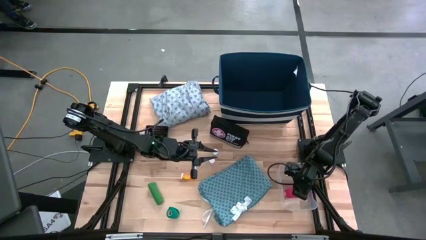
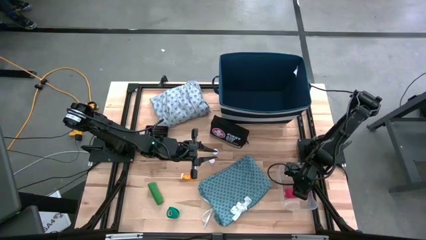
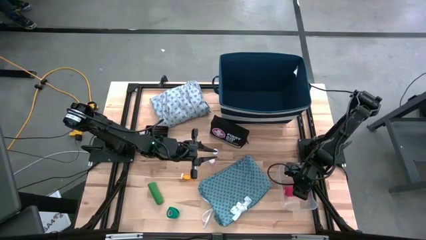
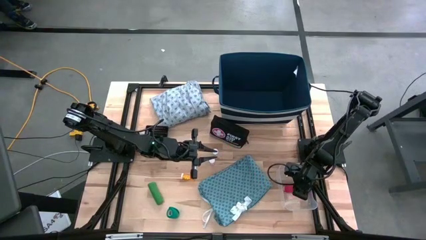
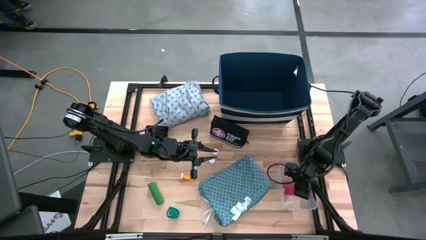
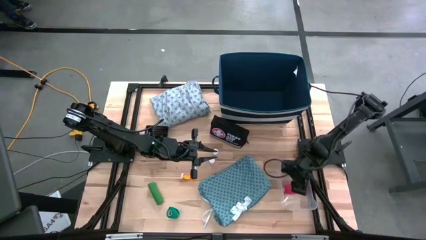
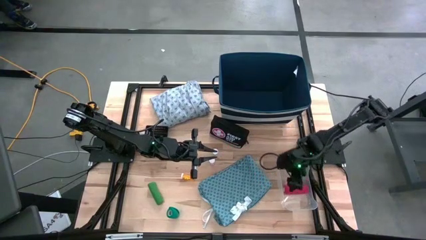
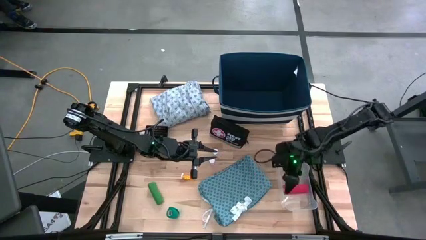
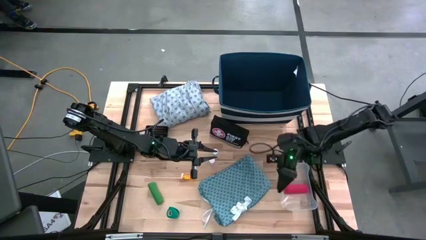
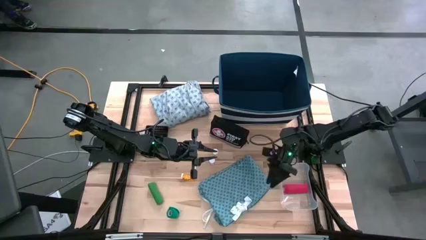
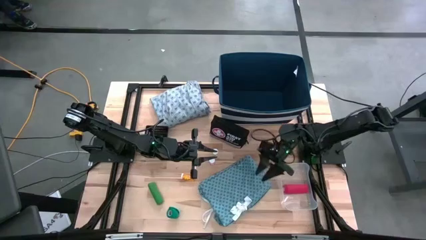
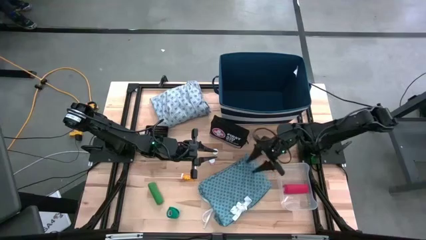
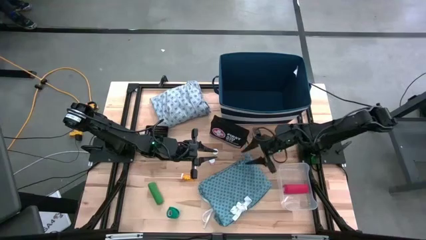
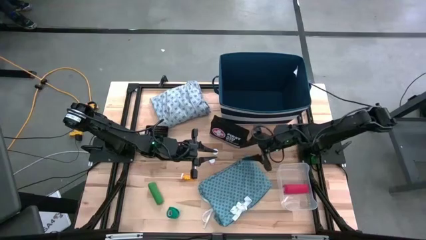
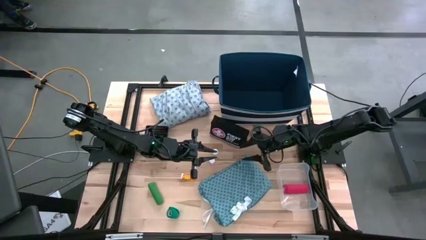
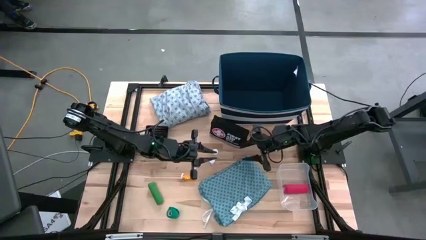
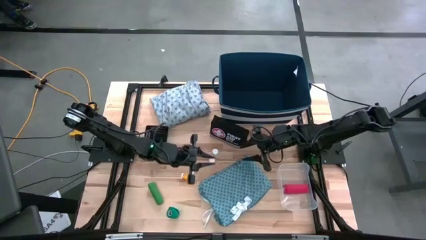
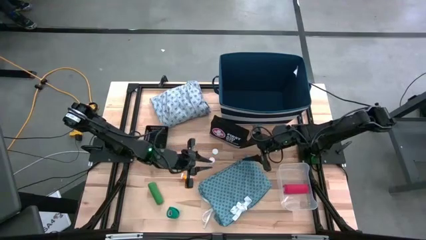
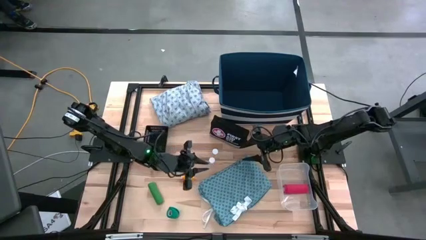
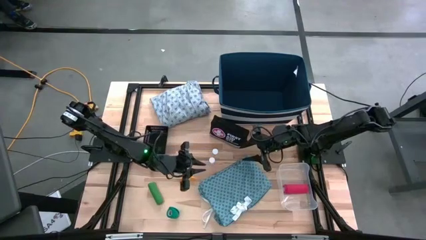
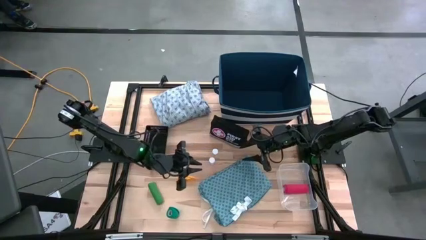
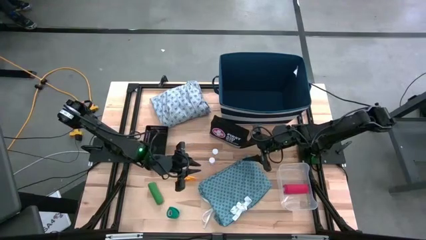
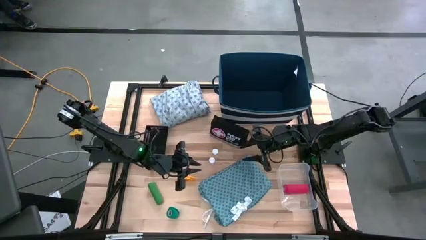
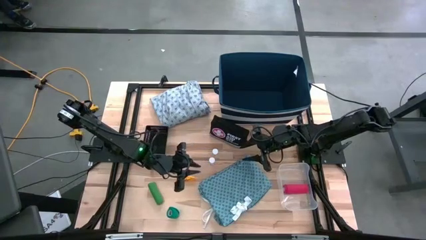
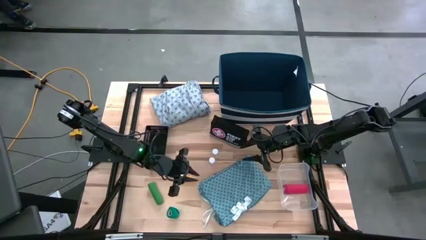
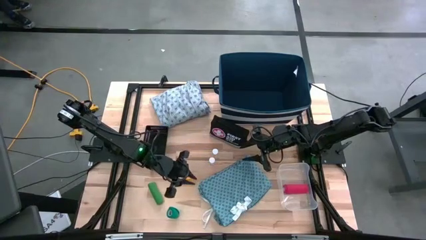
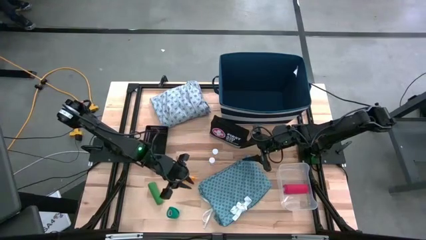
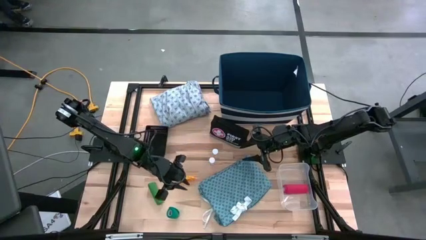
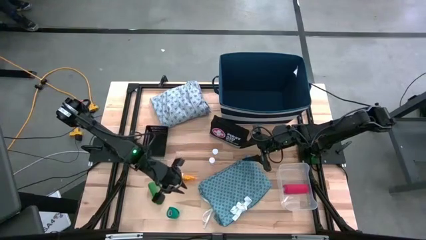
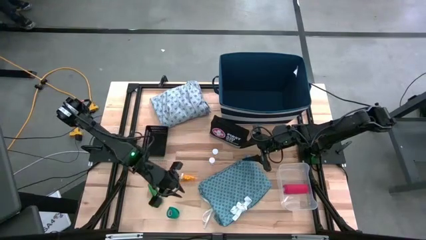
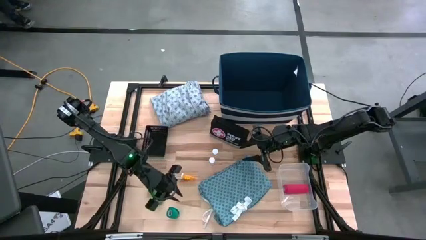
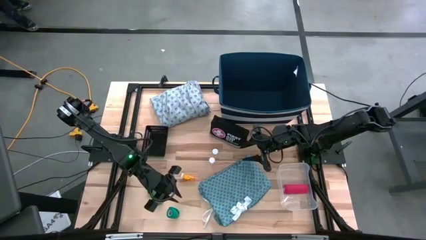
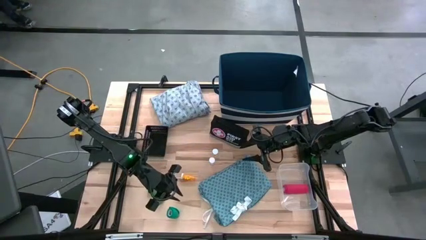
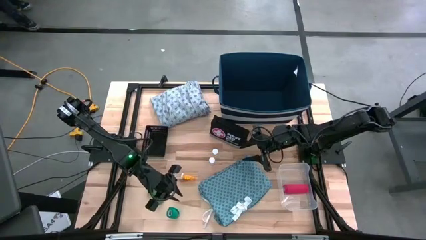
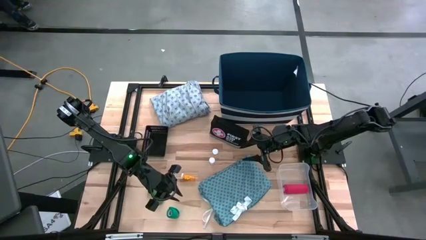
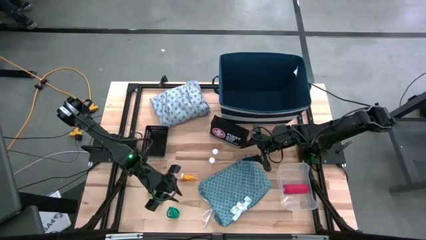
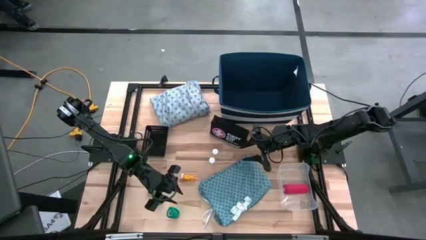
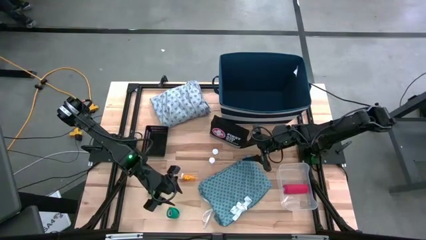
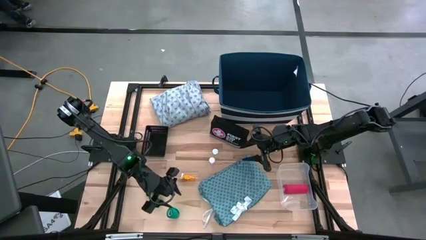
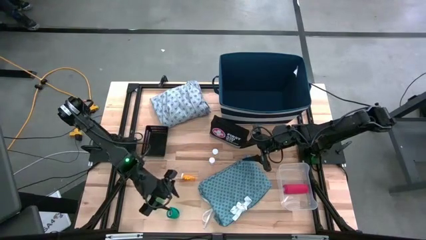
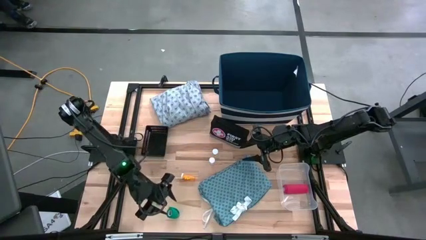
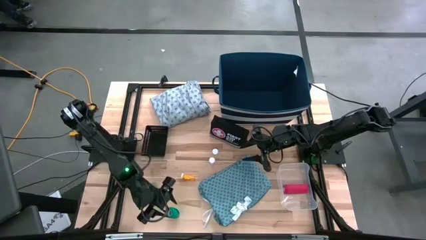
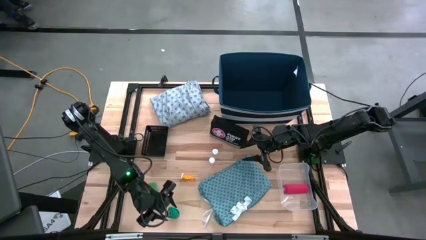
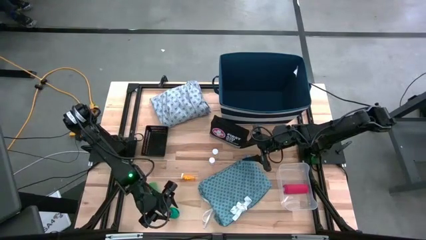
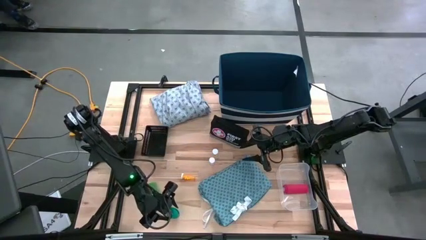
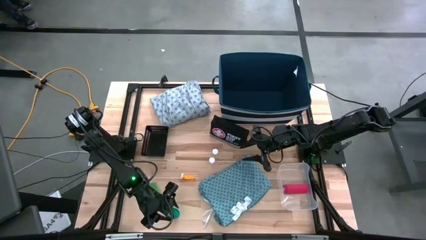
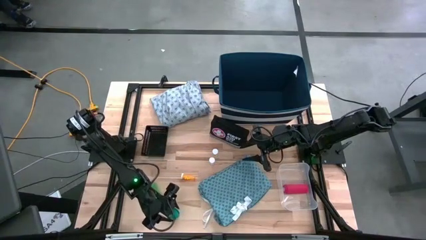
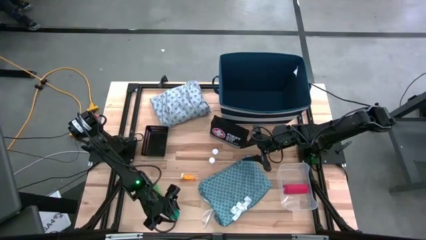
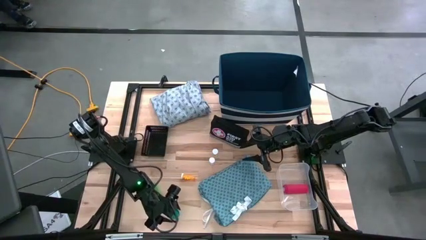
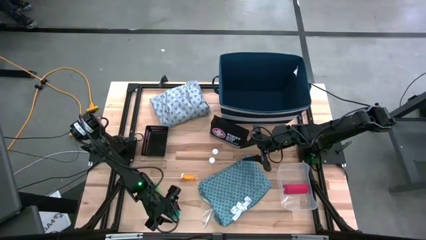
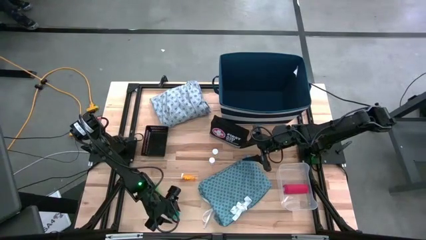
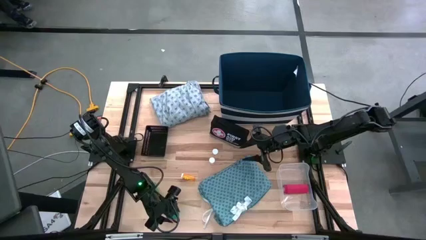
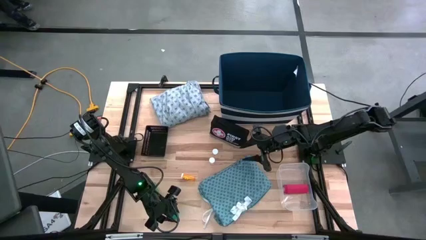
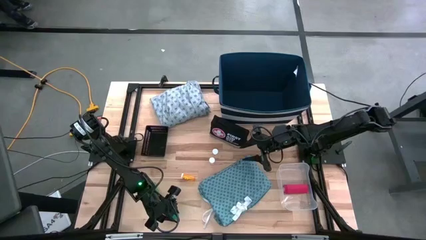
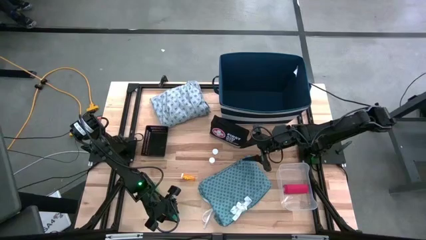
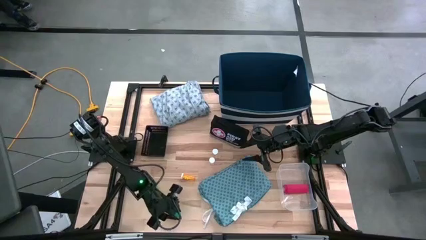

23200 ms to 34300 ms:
Task: Pick & place medical supplies in basket/bin
Put the dark green bandage into the transparent bin
